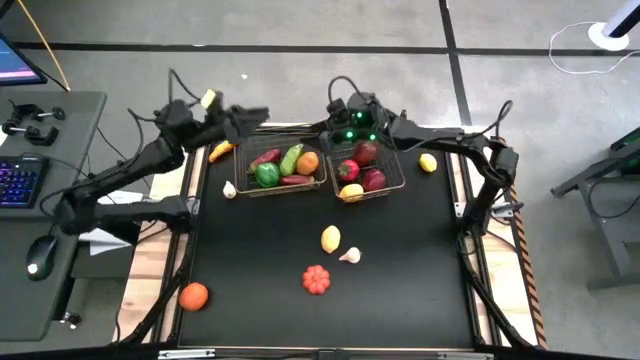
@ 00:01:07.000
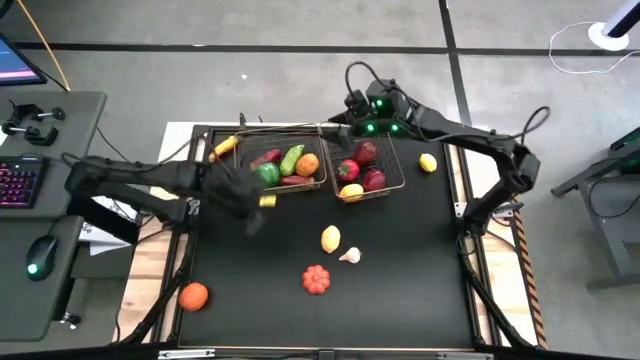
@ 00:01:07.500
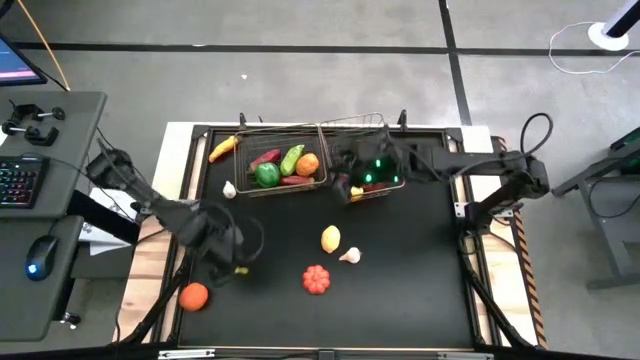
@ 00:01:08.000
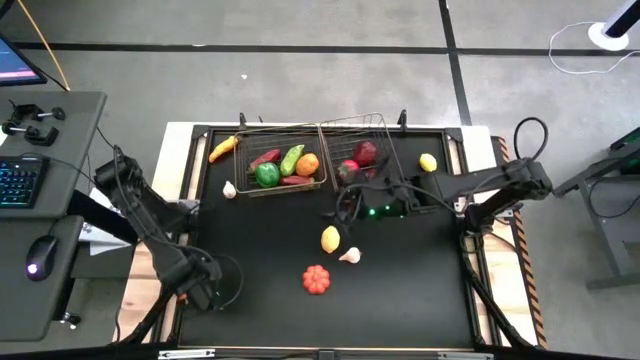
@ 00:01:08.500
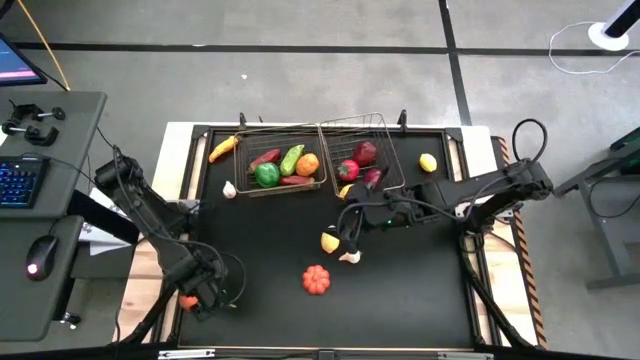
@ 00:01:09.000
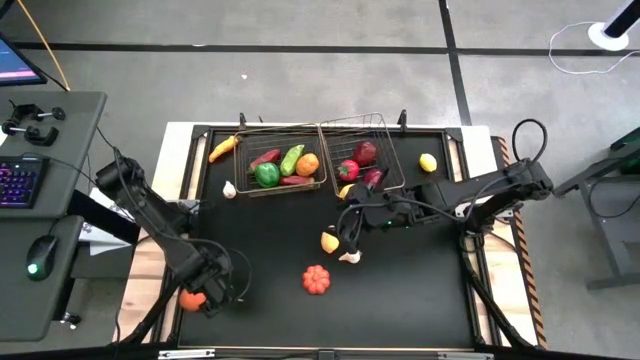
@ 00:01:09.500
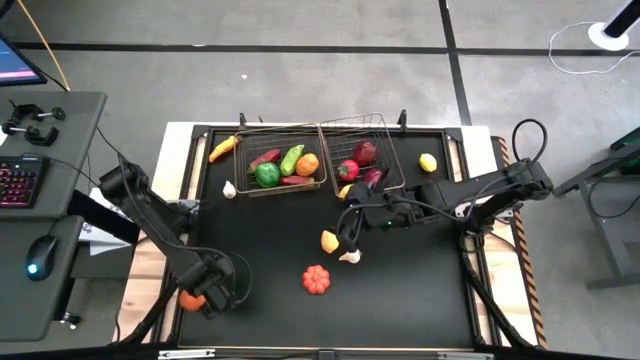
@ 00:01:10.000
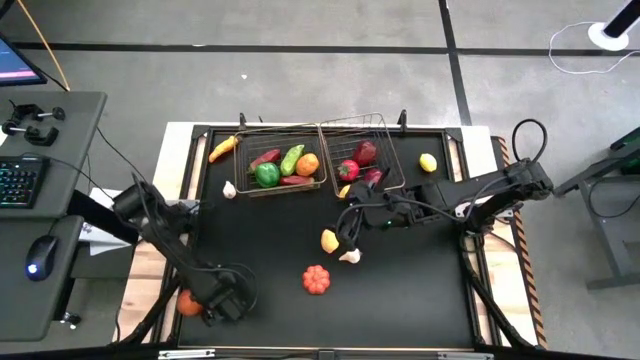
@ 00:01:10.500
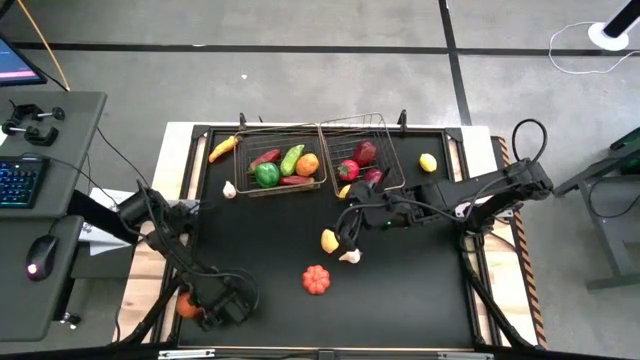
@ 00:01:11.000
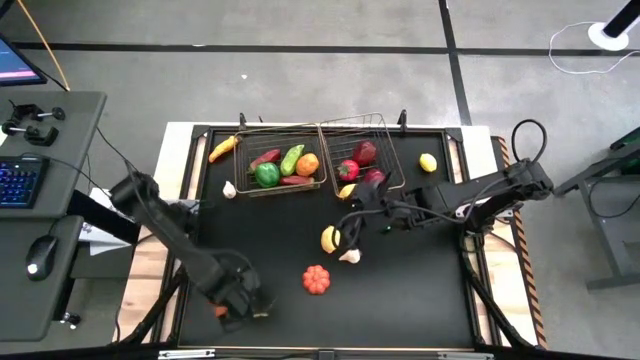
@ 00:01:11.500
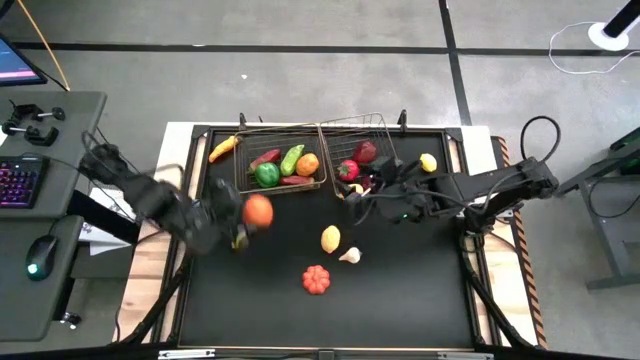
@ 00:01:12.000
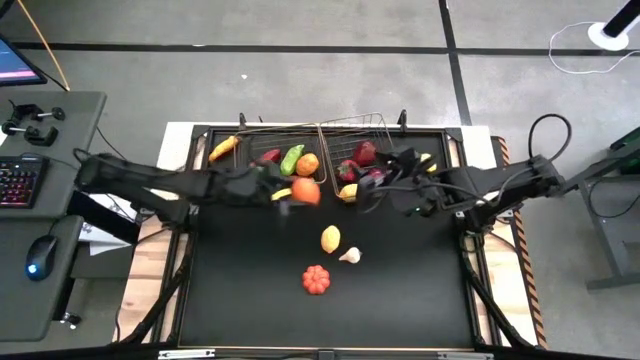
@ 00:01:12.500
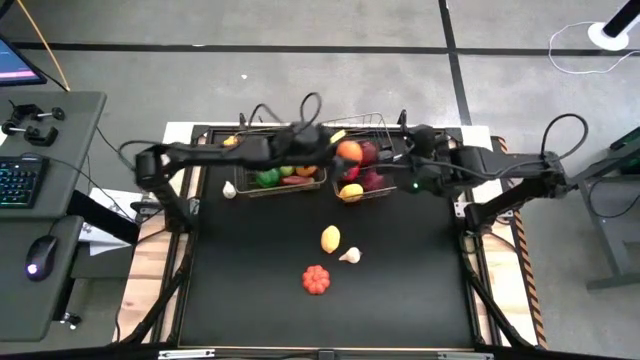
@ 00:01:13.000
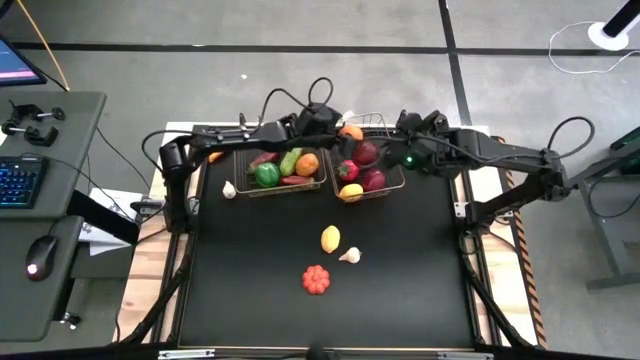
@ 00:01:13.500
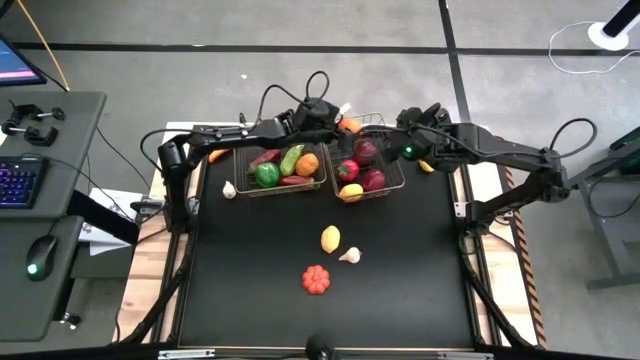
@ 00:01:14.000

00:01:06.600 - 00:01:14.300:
Task: Sort produce into baskets
Put the orange into the right wire basket

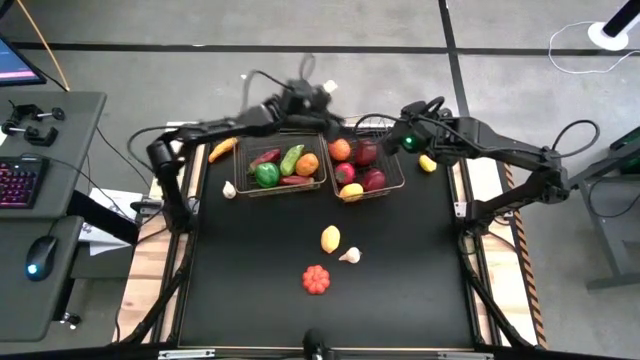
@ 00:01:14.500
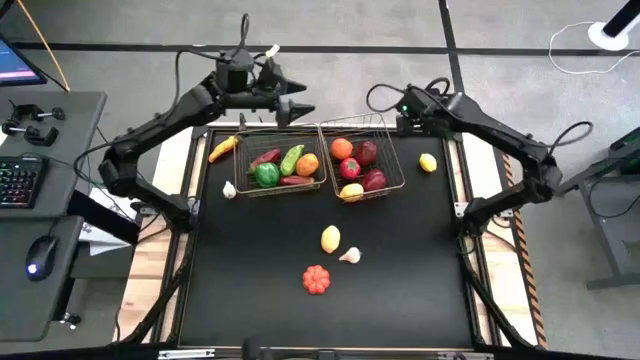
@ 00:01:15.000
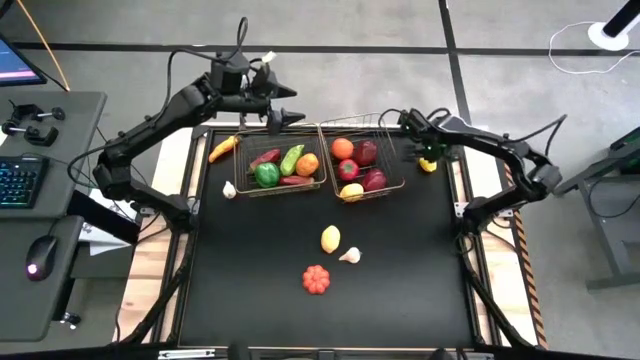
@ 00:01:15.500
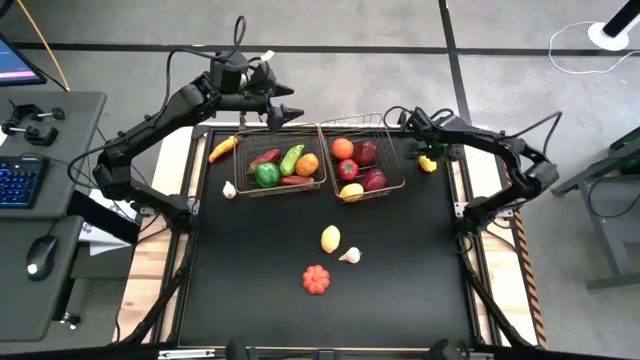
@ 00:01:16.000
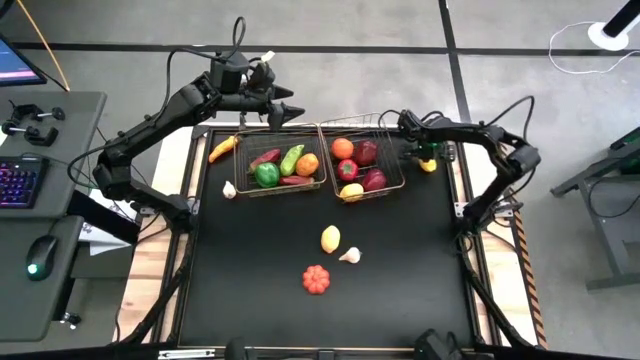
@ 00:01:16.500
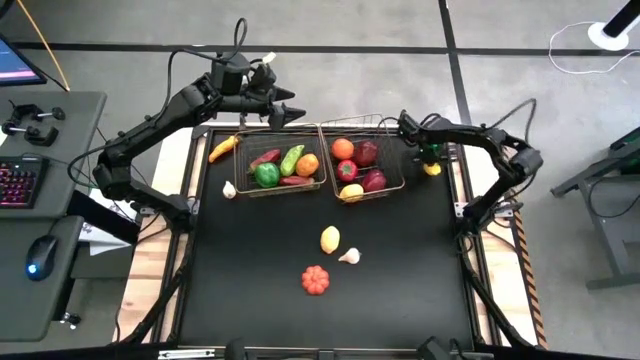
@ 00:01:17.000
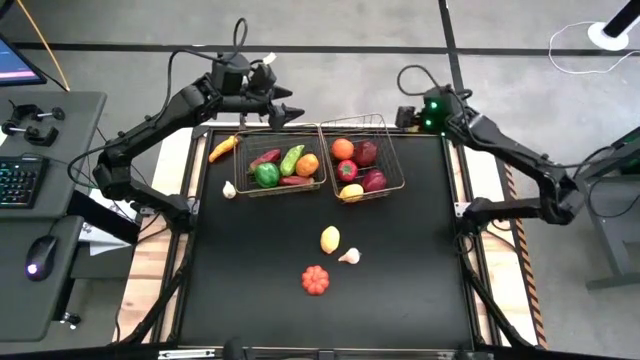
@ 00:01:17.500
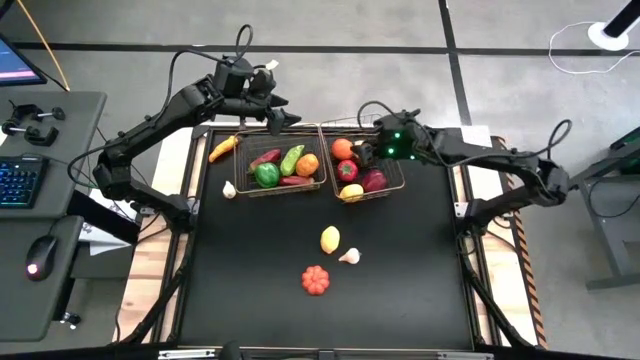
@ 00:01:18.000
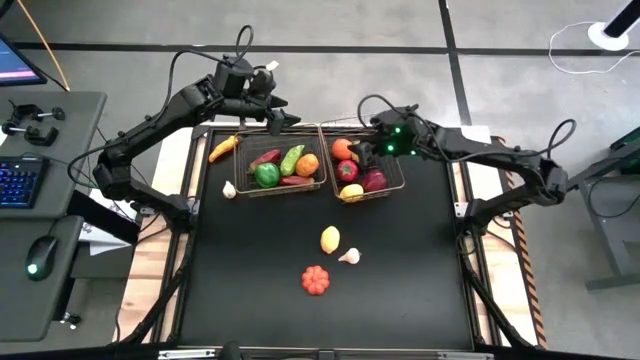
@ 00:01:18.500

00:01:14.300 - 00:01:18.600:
Put the top yellow lemon into the right wire basket

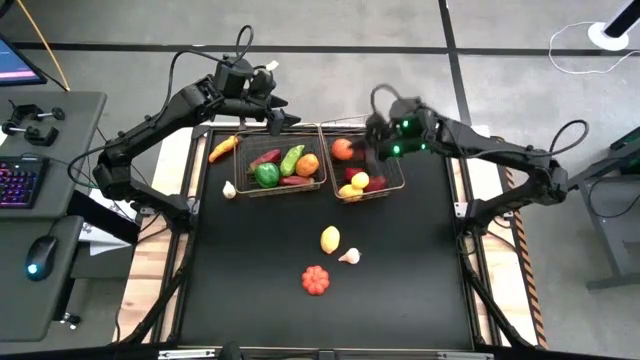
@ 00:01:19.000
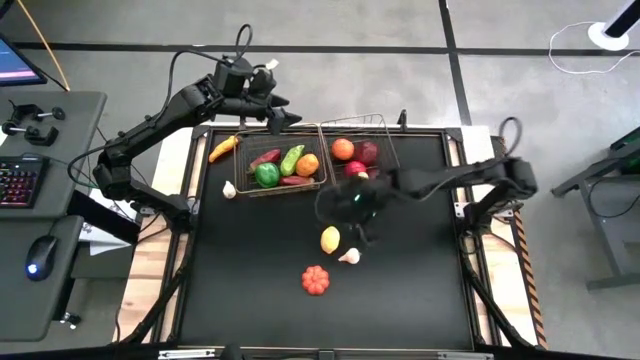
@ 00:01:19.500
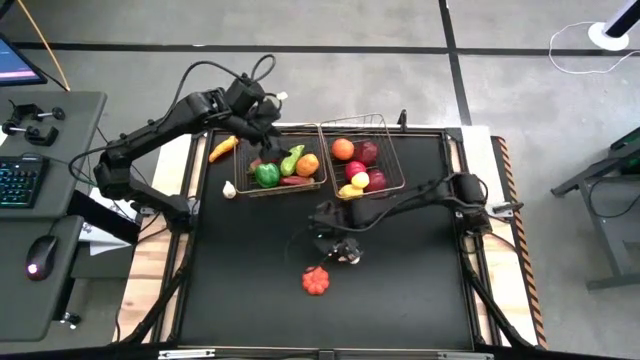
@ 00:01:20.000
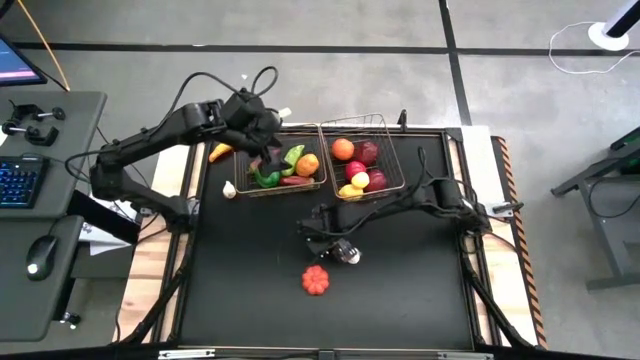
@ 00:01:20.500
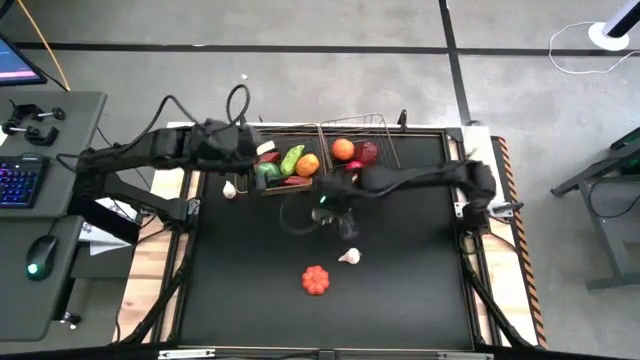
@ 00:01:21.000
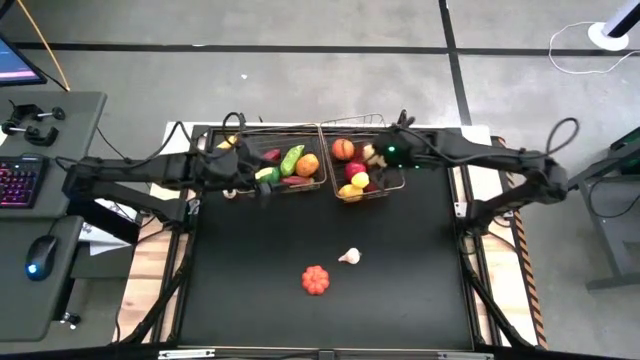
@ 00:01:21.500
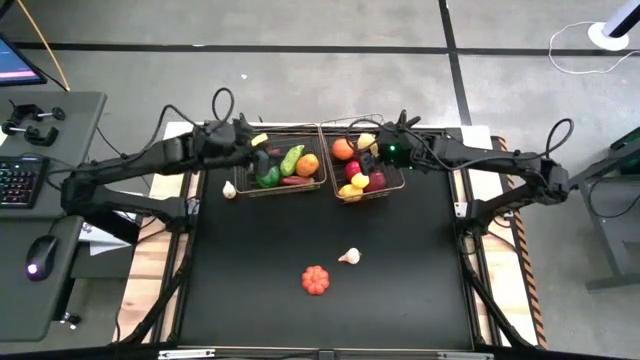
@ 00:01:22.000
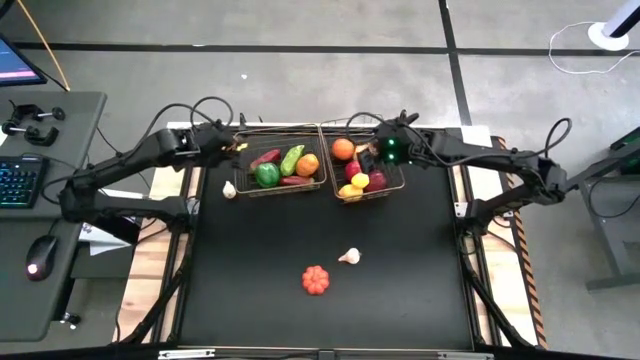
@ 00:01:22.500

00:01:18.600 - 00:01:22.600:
Put the yellow lemon into the right wire basket

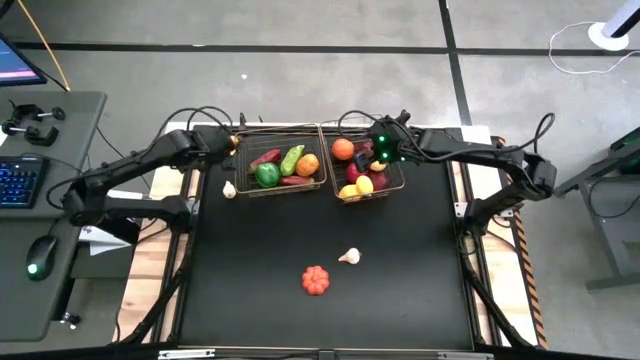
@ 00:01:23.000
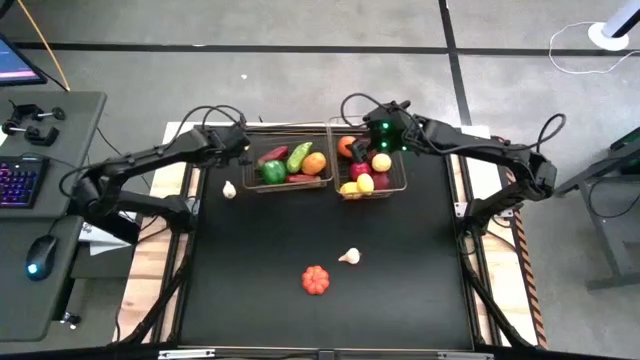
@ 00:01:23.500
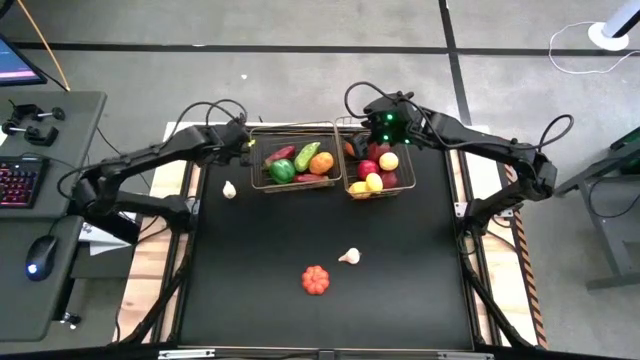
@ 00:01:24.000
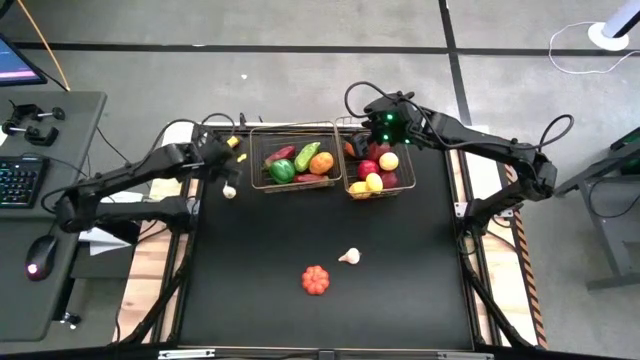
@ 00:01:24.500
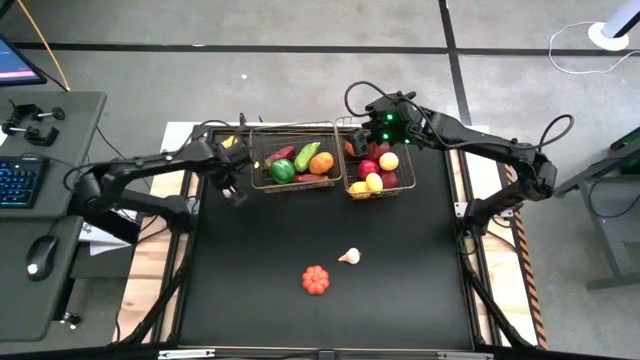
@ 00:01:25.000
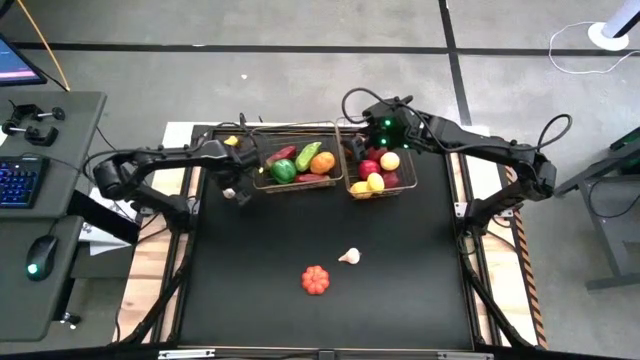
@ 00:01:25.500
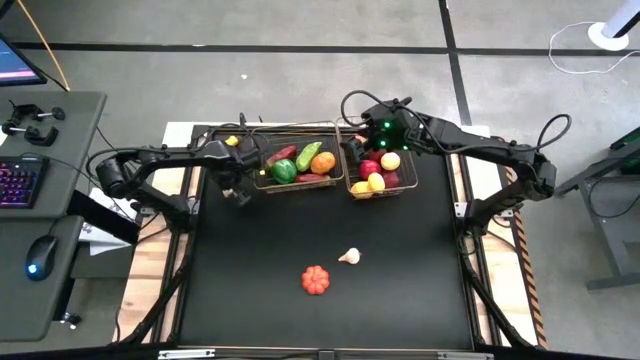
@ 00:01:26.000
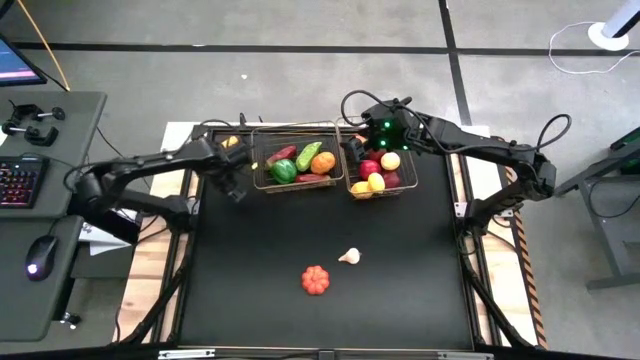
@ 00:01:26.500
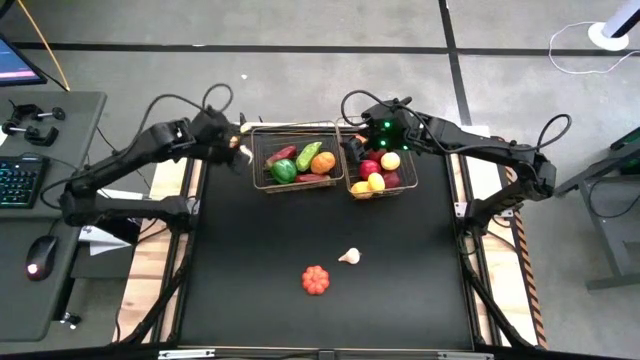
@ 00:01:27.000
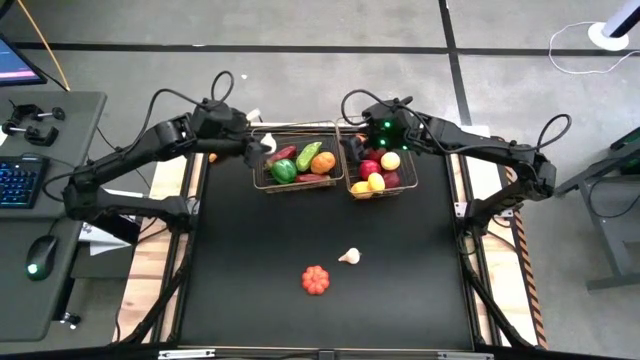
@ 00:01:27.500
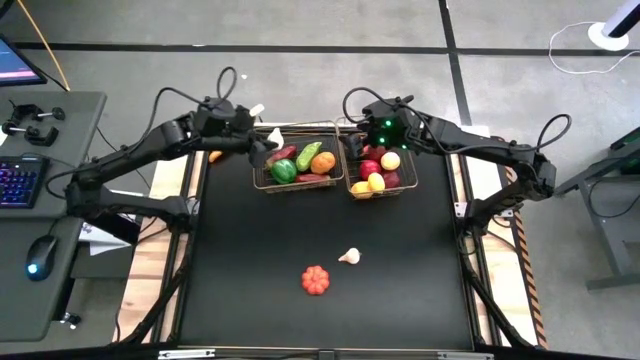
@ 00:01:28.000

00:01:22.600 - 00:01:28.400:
Put the top white garlic into the left wire basket
